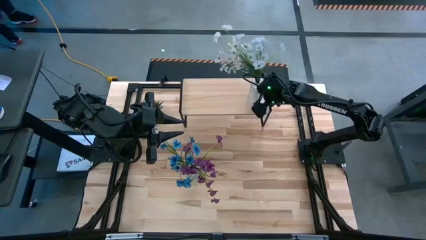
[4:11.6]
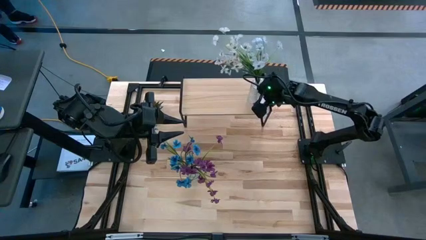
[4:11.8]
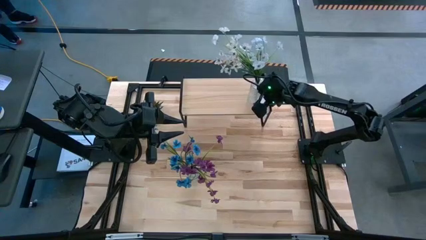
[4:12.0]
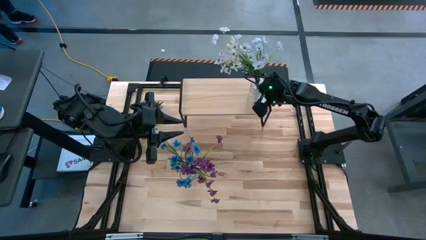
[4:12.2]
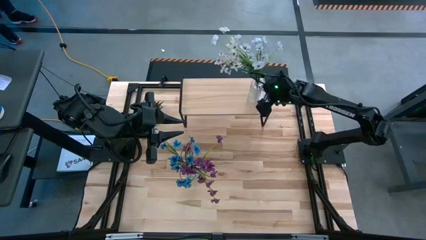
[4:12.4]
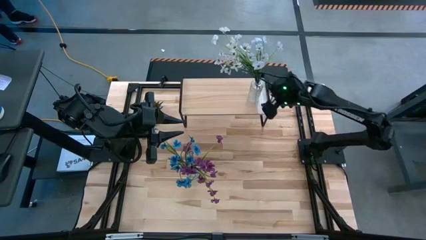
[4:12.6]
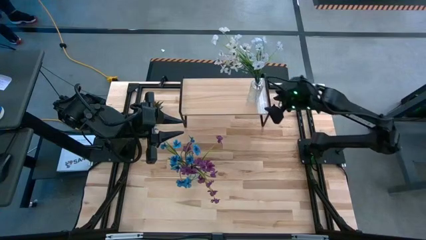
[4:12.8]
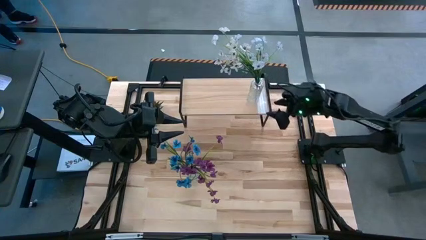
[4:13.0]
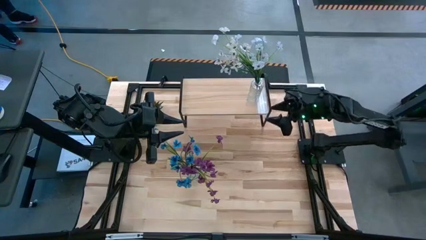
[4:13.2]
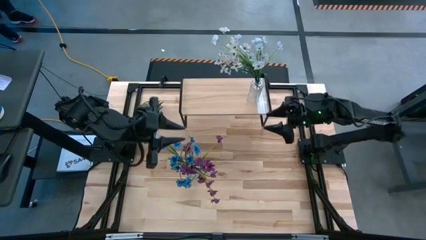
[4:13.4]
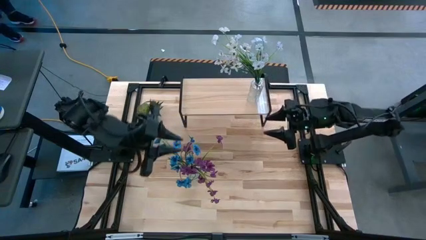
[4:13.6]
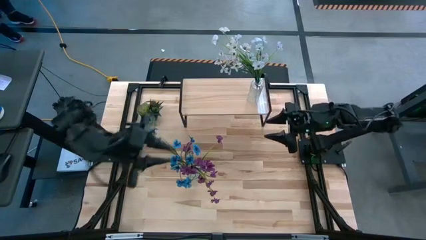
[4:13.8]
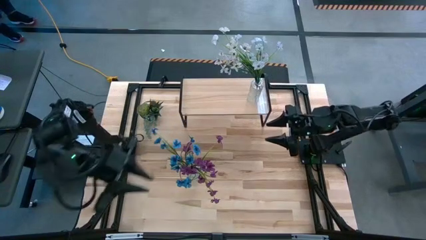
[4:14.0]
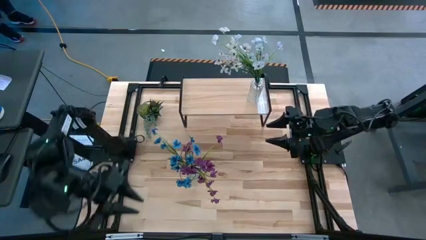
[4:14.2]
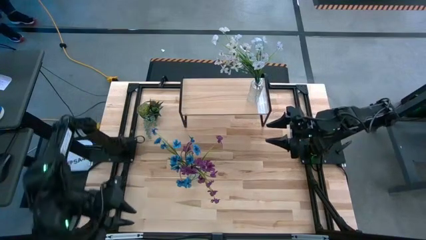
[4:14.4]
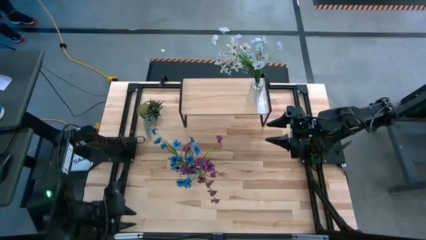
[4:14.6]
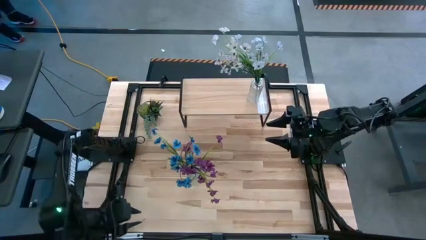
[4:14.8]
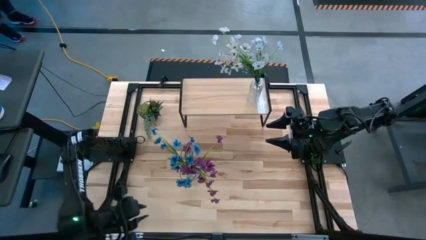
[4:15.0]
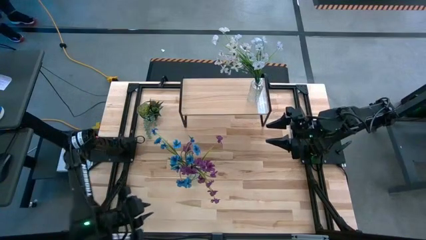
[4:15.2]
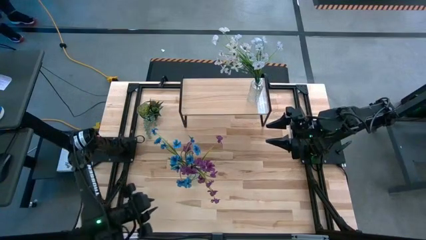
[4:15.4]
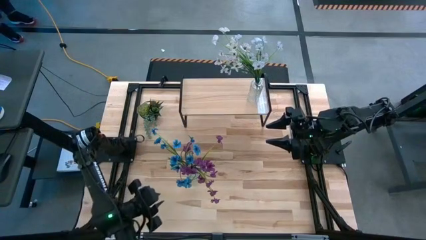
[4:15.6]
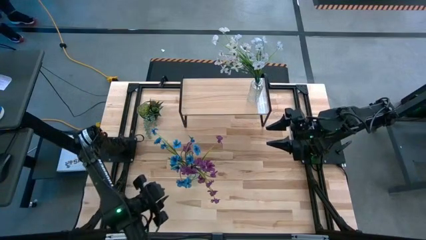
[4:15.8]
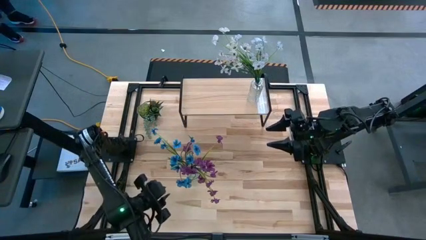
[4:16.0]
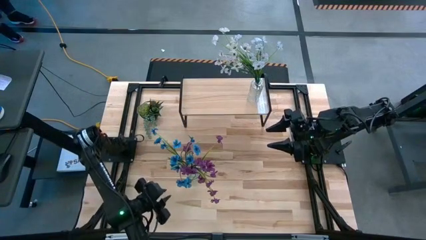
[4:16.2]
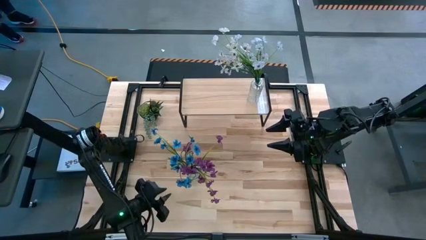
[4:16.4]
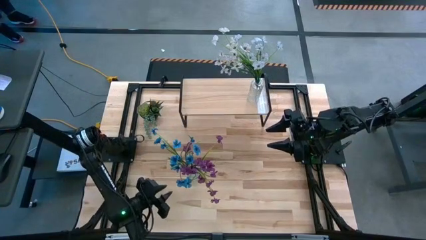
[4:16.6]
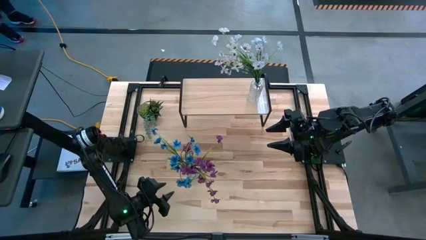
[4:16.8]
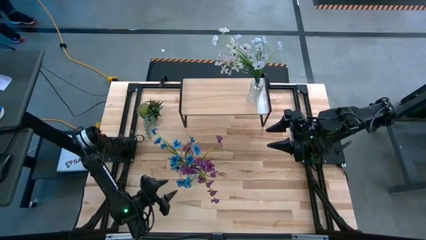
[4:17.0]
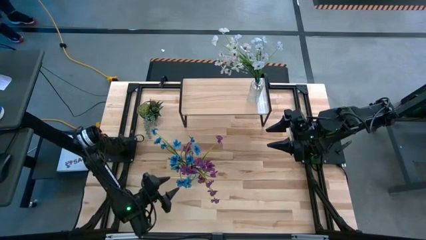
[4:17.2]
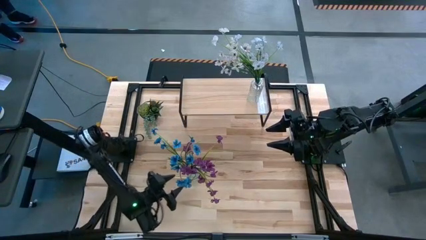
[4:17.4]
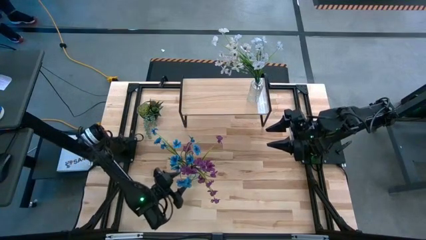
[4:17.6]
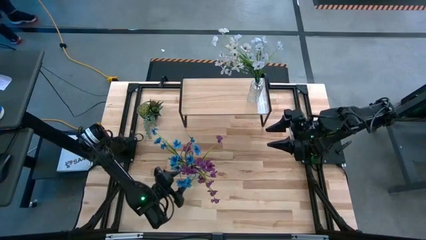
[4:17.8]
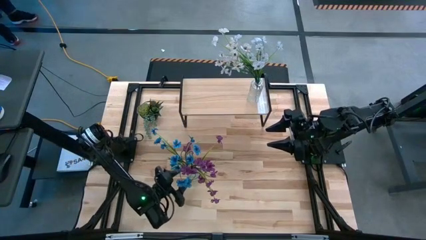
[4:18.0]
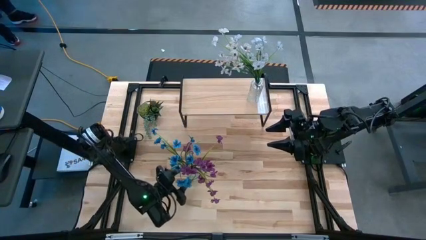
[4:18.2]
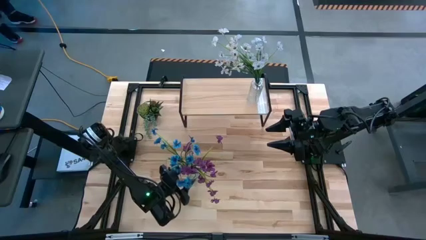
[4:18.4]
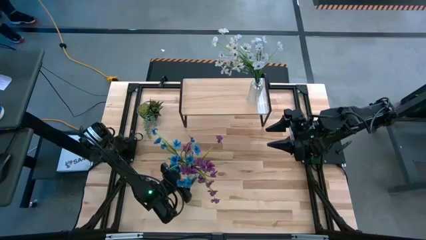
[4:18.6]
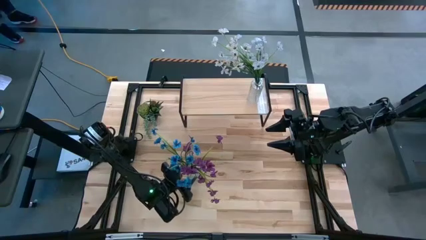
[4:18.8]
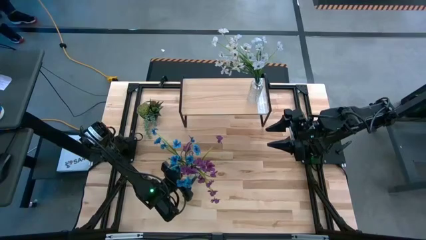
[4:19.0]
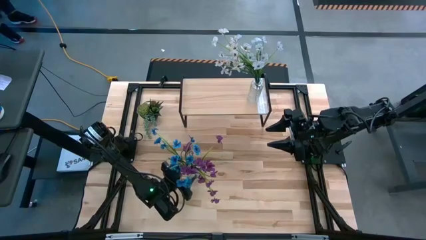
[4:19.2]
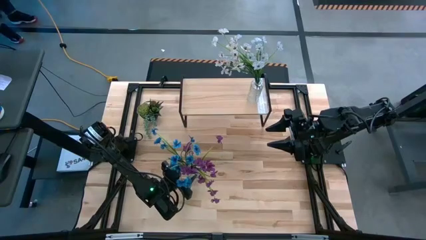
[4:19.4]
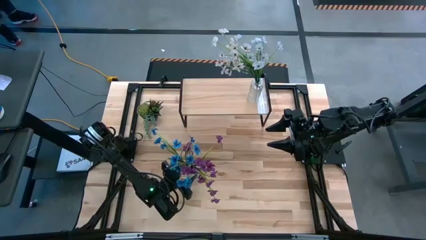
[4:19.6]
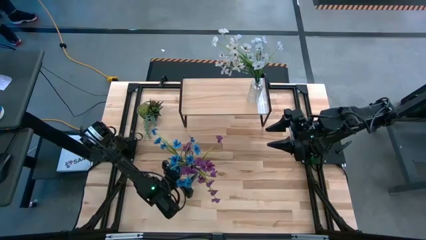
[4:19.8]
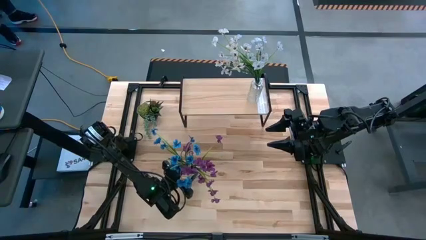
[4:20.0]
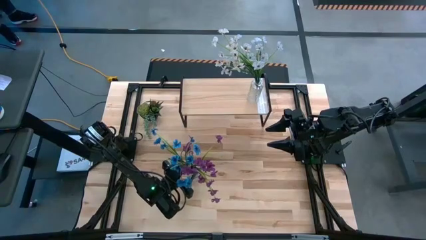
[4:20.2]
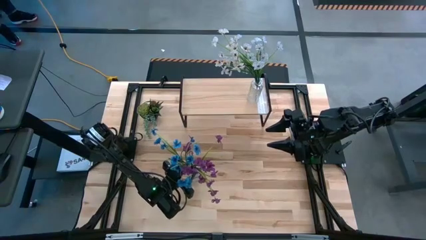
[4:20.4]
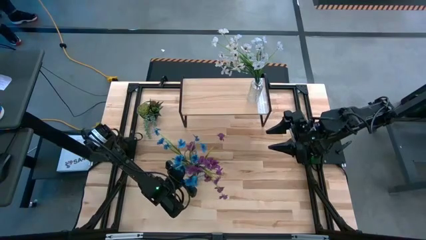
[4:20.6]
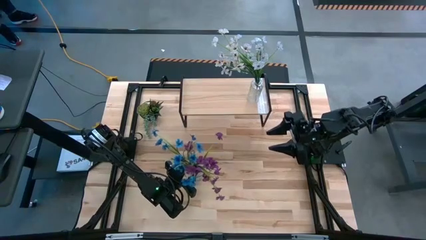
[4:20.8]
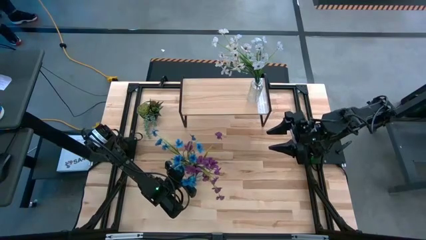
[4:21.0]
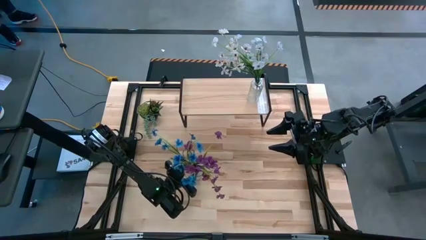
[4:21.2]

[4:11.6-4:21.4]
Task: Pick and place flowers into a vace then onto a shelf
Put the transparent vase with flowers on the shelf

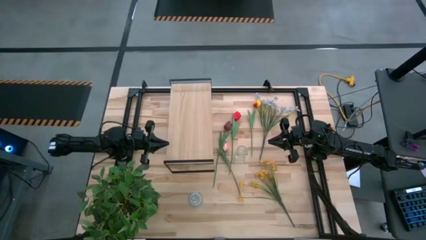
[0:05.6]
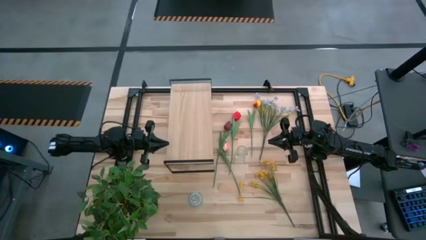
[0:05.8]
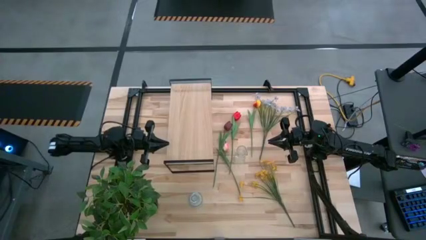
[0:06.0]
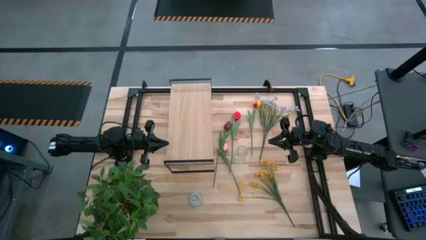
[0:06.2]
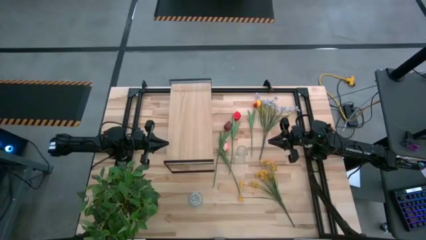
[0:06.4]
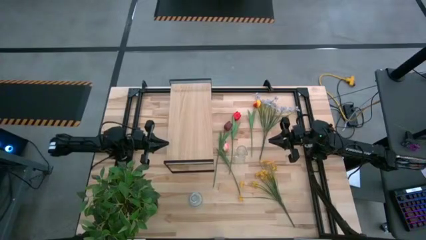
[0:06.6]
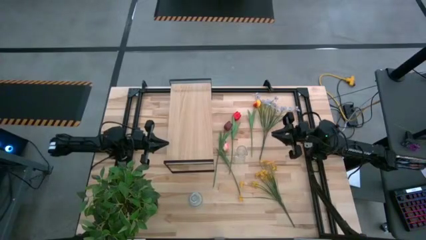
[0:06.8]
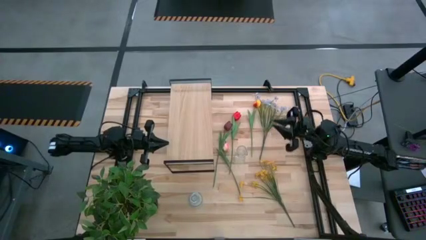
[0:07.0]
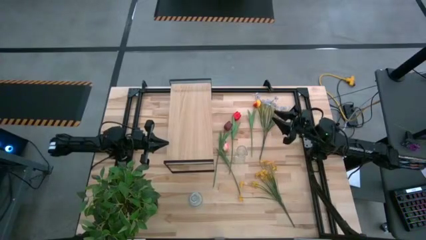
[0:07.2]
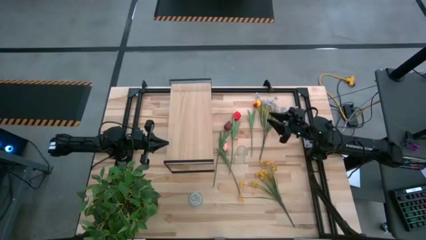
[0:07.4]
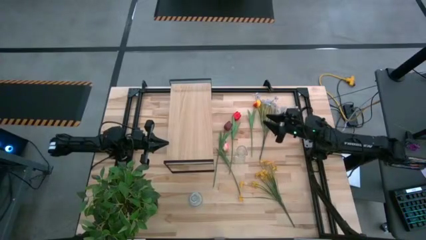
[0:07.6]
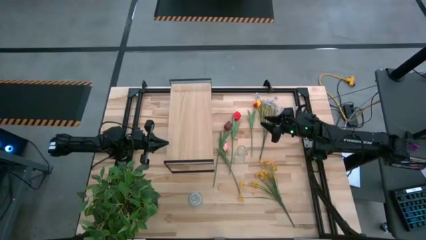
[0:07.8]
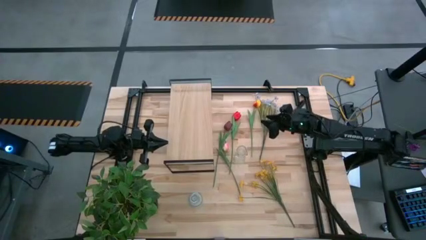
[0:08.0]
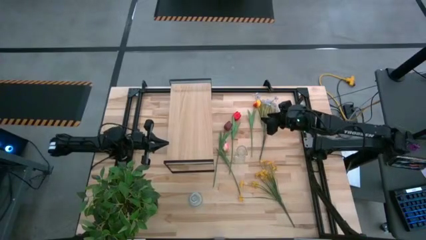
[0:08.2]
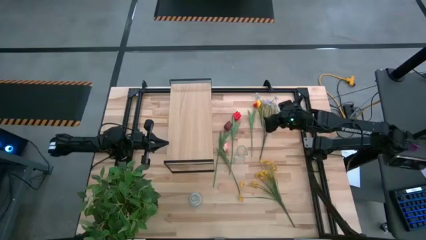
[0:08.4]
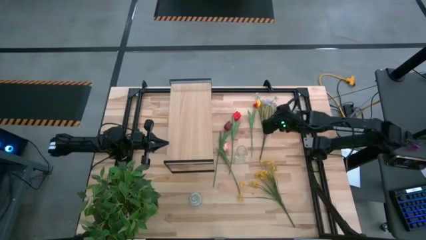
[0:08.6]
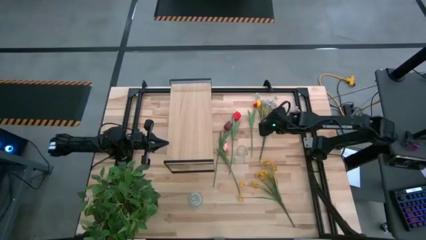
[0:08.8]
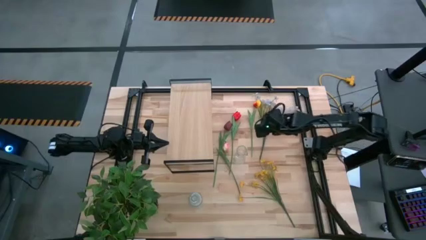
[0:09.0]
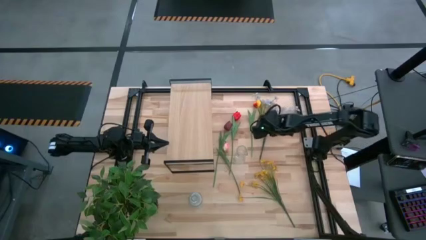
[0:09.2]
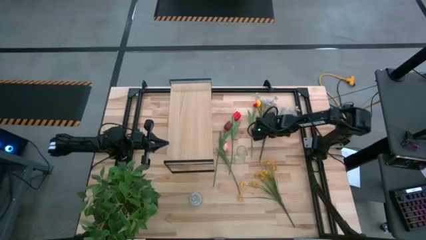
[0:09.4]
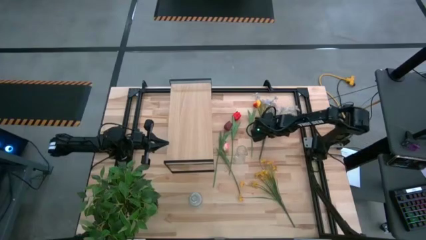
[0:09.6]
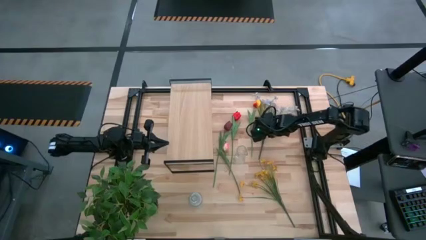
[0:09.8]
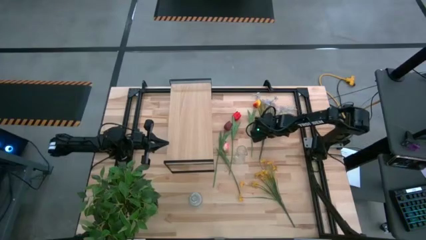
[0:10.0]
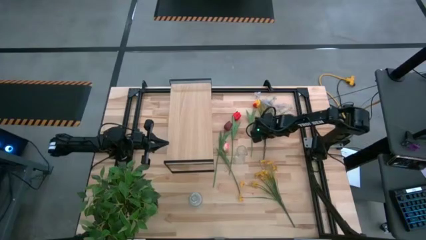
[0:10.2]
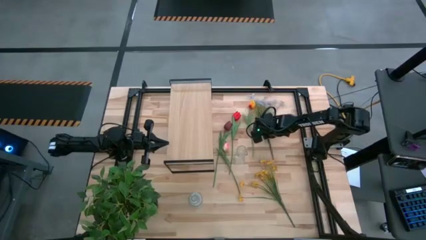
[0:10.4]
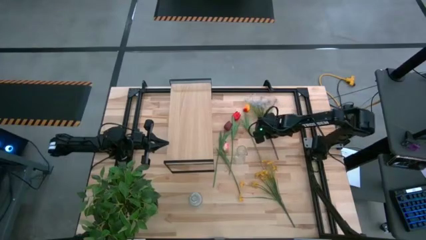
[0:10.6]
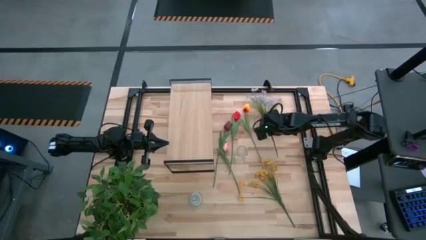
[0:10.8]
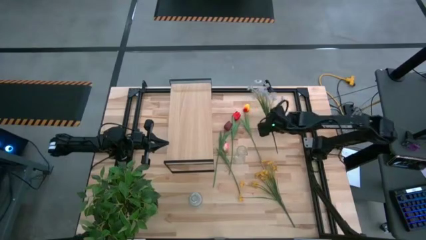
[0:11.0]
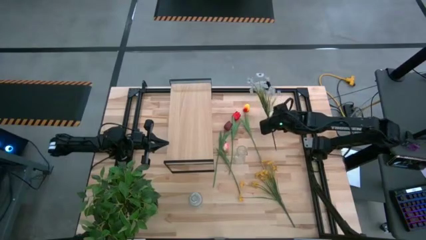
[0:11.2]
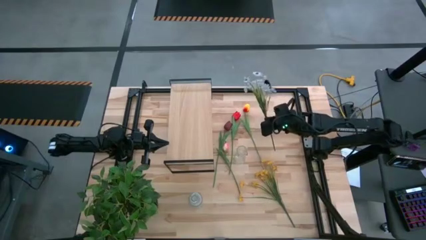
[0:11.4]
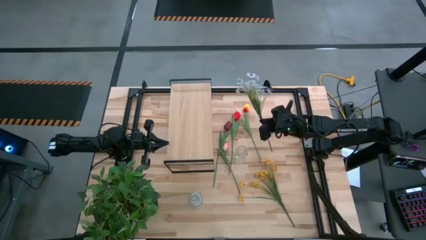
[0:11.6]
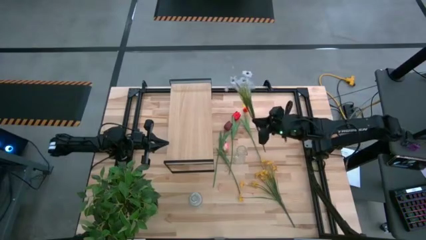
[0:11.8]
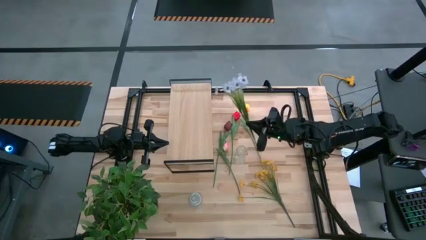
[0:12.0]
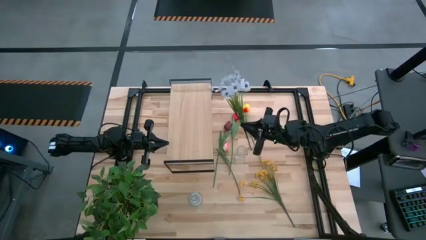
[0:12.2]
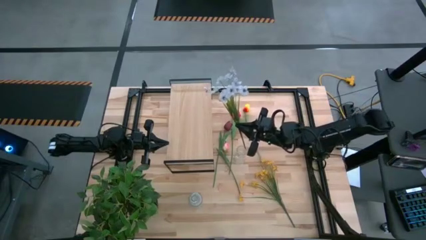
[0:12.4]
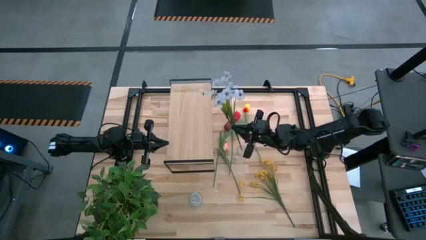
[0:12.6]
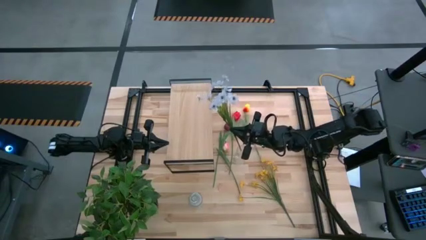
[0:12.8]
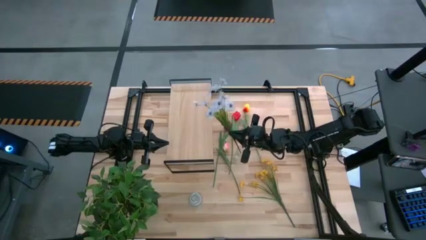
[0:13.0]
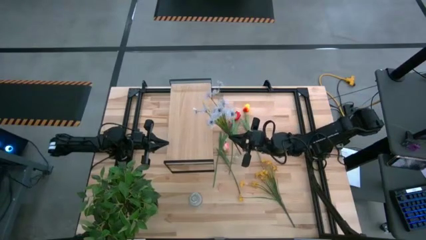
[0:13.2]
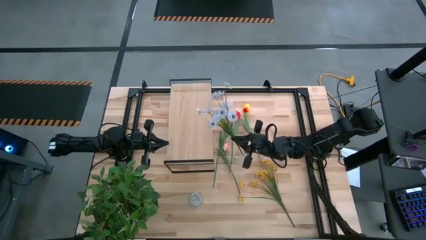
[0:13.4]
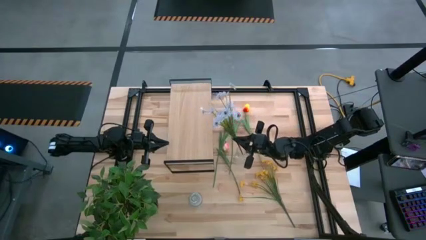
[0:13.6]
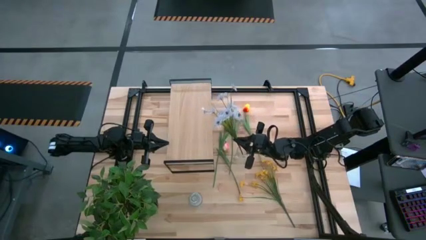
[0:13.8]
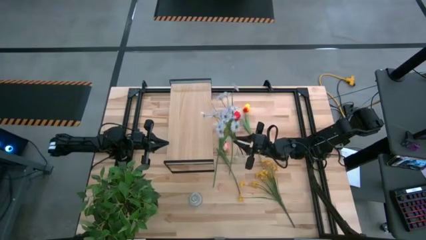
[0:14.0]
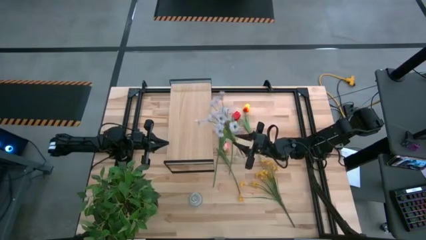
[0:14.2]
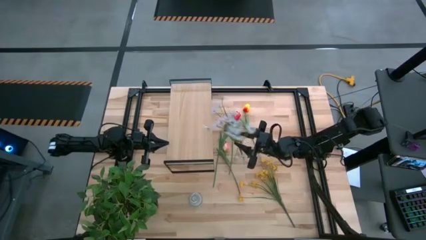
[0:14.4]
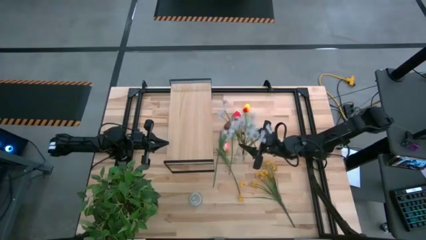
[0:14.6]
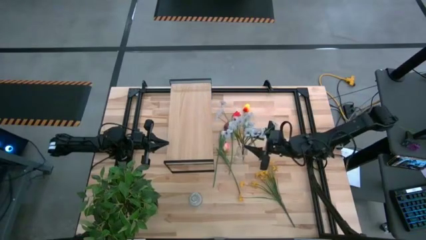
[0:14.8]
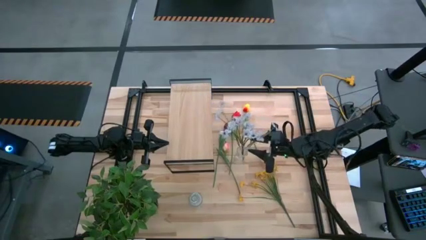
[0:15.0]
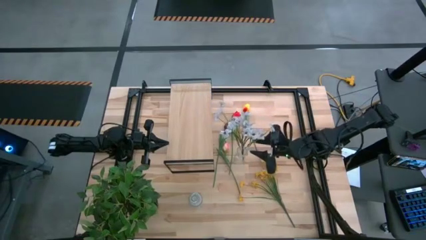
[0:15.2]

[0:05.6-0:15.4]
Task: Pick and place flowers into a vace then onto a shelf
Put the white flowers into the top transparent vase
